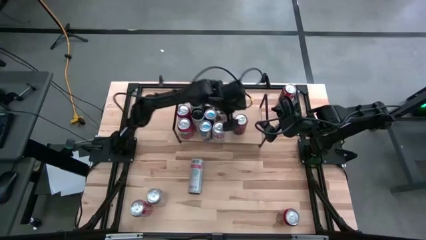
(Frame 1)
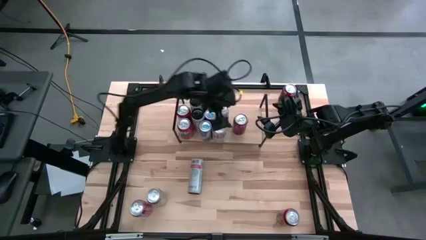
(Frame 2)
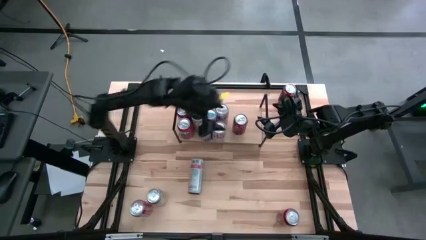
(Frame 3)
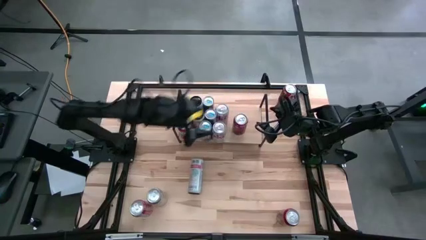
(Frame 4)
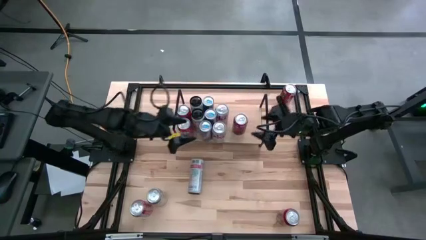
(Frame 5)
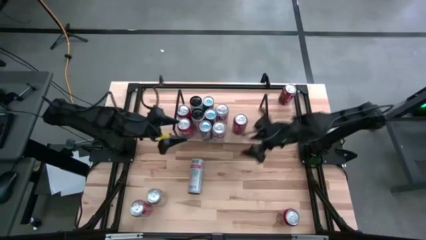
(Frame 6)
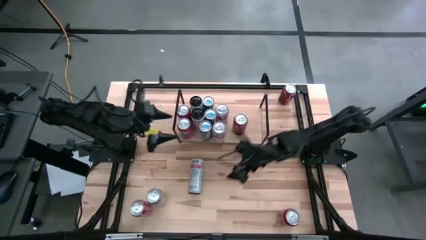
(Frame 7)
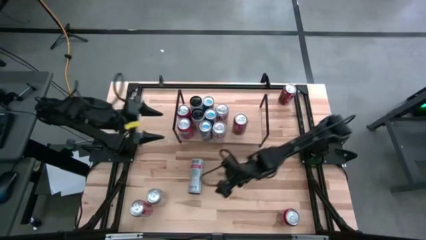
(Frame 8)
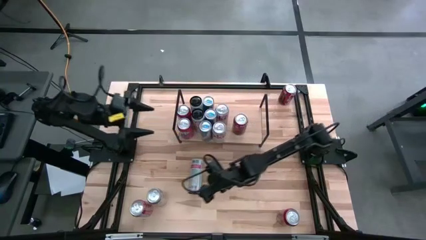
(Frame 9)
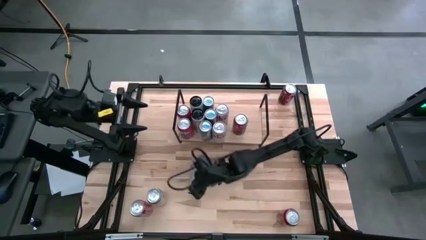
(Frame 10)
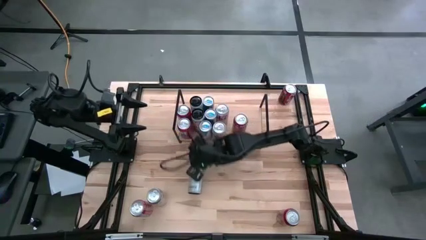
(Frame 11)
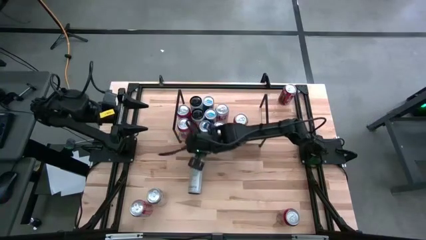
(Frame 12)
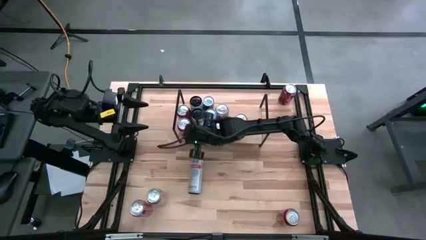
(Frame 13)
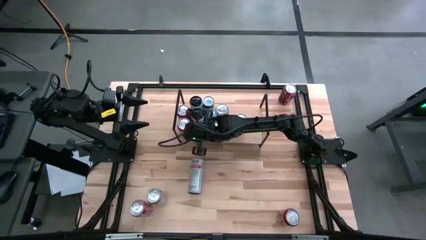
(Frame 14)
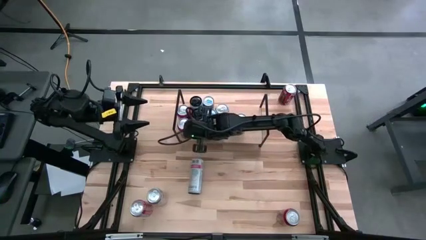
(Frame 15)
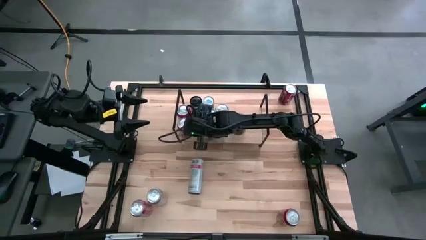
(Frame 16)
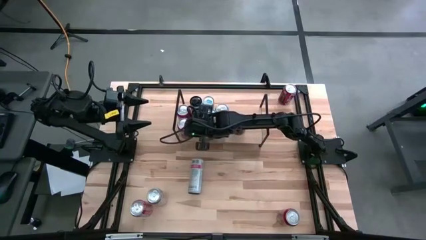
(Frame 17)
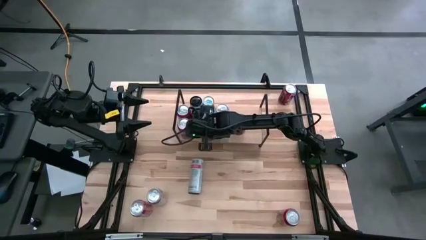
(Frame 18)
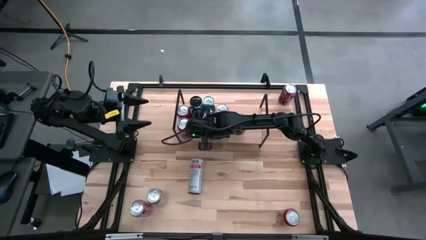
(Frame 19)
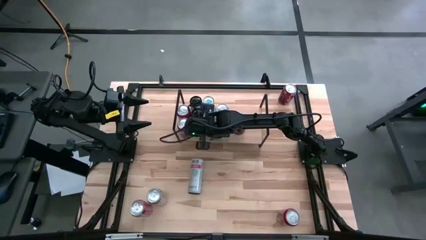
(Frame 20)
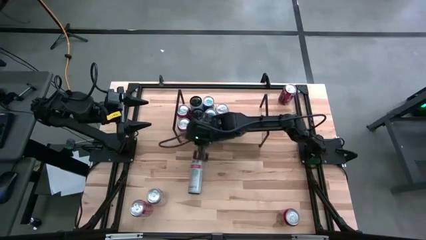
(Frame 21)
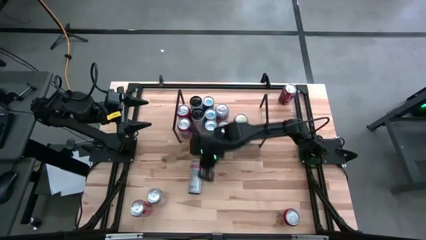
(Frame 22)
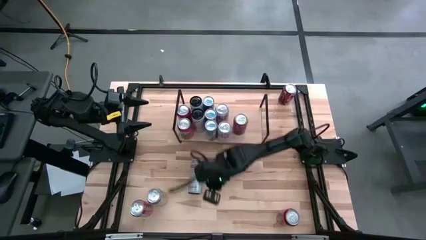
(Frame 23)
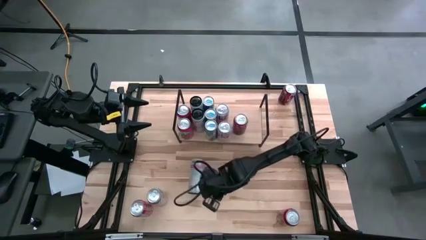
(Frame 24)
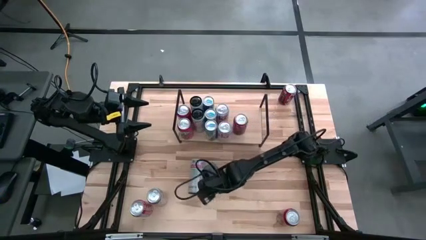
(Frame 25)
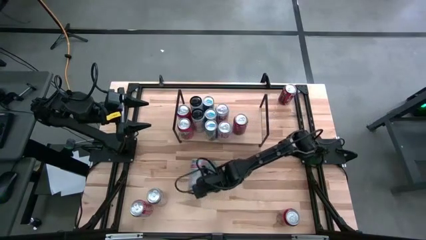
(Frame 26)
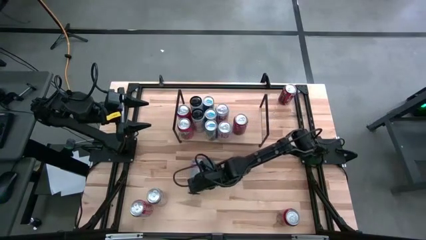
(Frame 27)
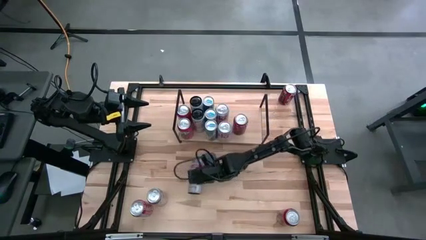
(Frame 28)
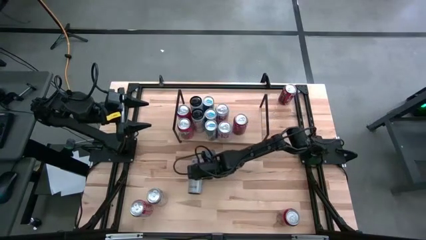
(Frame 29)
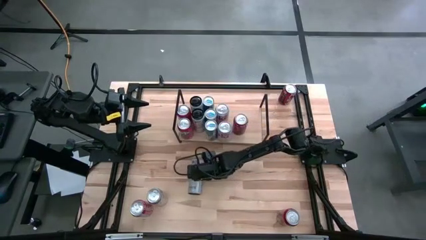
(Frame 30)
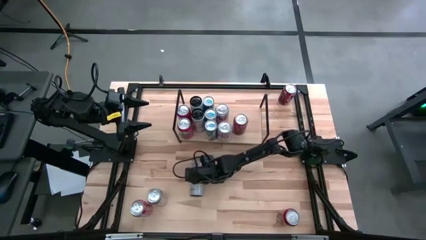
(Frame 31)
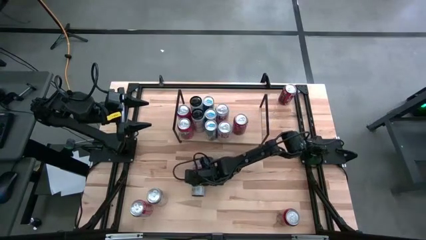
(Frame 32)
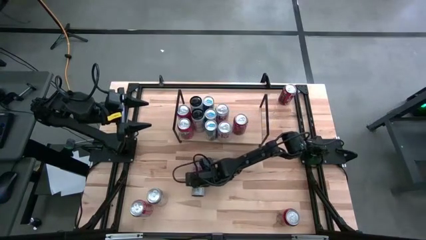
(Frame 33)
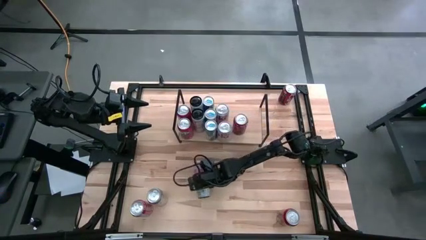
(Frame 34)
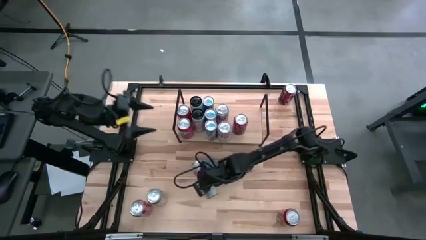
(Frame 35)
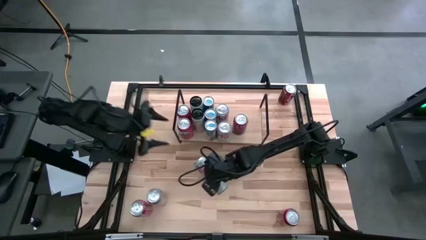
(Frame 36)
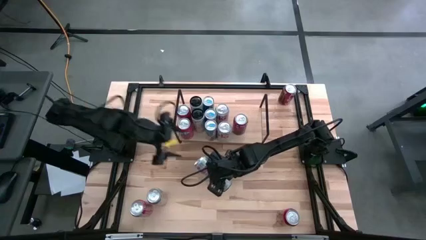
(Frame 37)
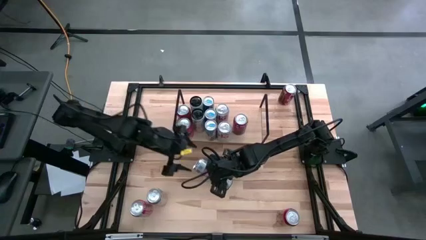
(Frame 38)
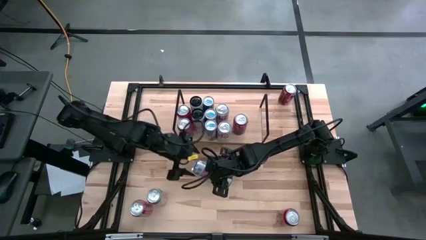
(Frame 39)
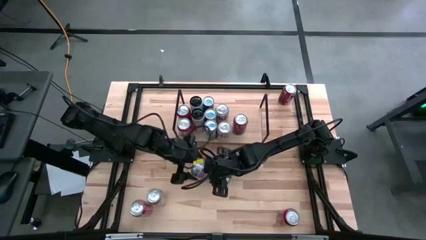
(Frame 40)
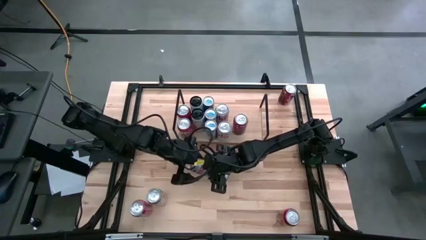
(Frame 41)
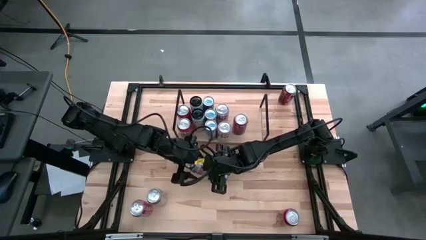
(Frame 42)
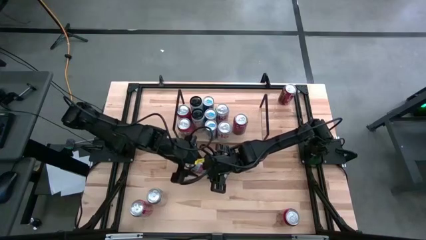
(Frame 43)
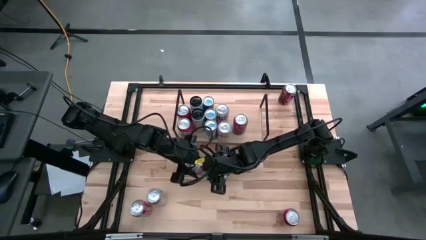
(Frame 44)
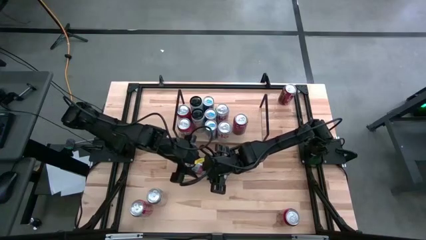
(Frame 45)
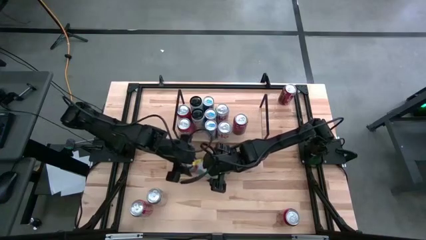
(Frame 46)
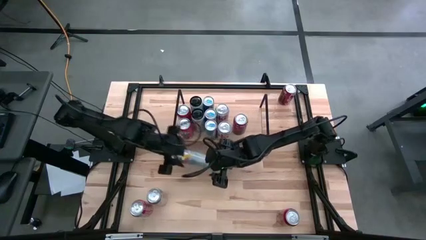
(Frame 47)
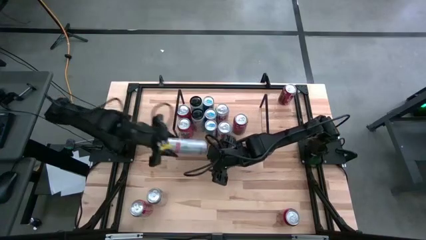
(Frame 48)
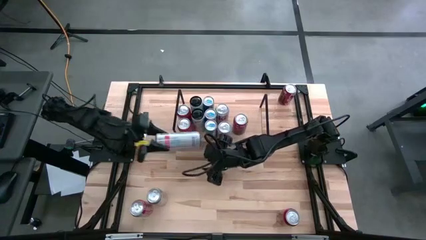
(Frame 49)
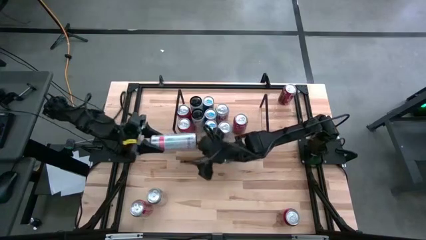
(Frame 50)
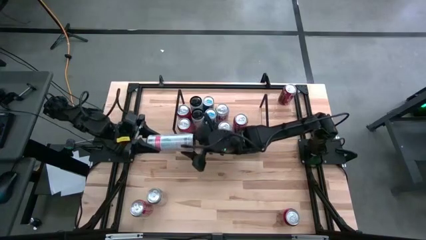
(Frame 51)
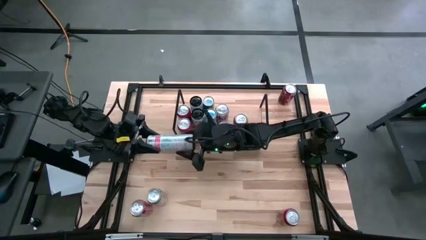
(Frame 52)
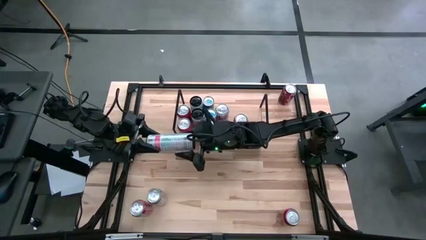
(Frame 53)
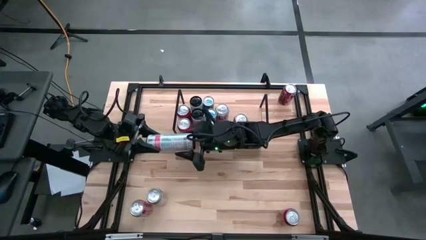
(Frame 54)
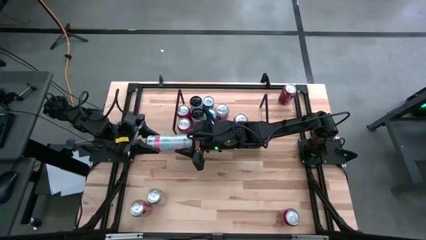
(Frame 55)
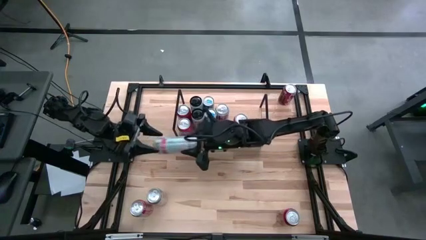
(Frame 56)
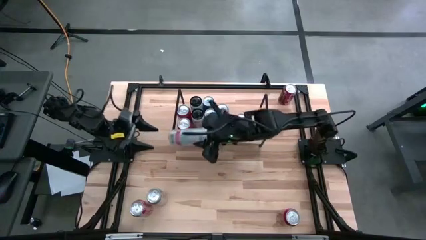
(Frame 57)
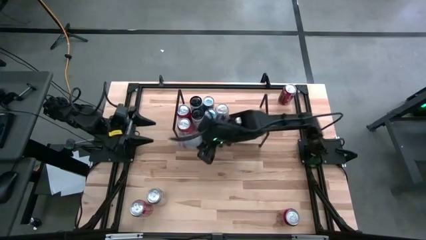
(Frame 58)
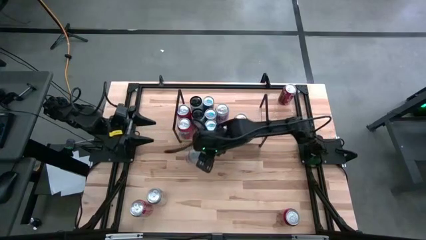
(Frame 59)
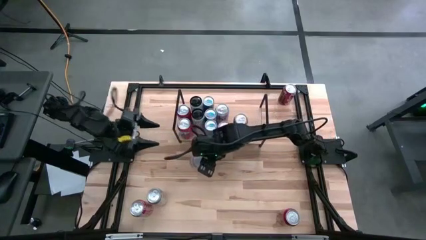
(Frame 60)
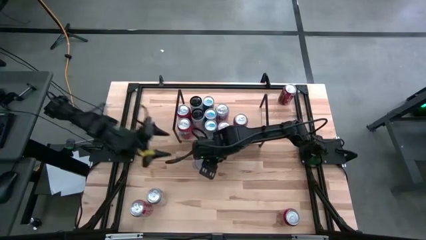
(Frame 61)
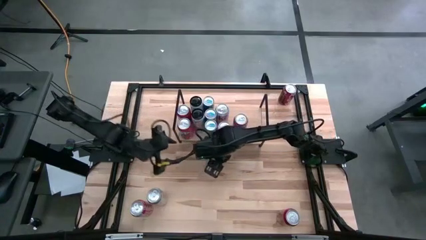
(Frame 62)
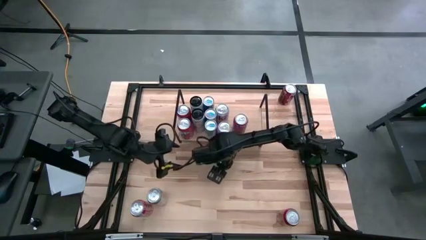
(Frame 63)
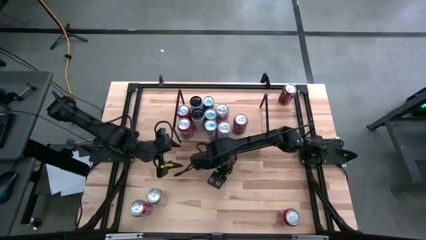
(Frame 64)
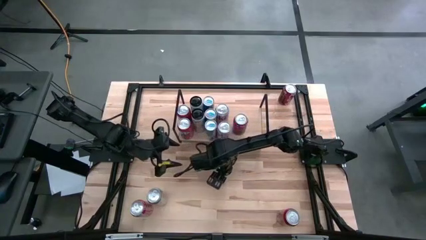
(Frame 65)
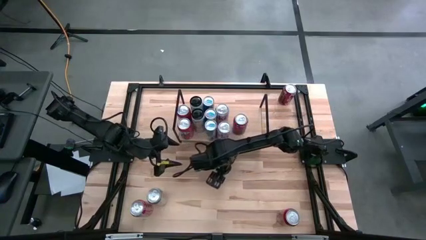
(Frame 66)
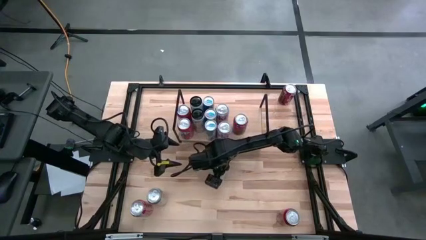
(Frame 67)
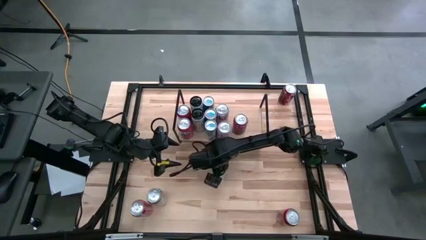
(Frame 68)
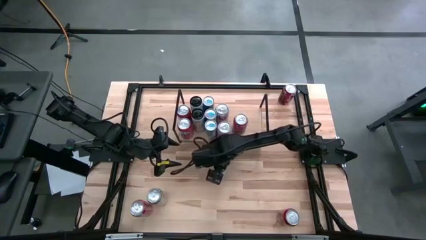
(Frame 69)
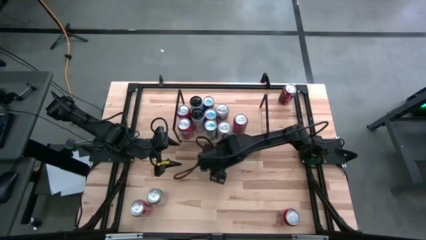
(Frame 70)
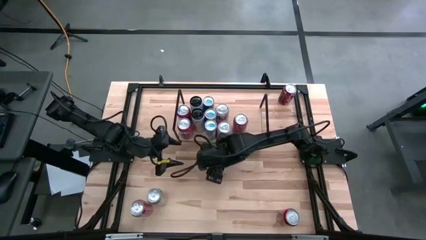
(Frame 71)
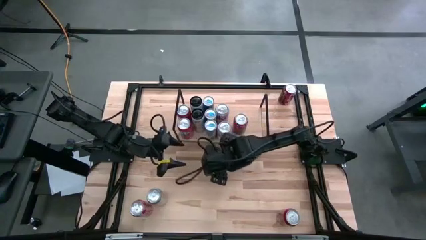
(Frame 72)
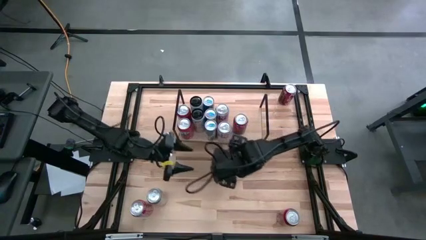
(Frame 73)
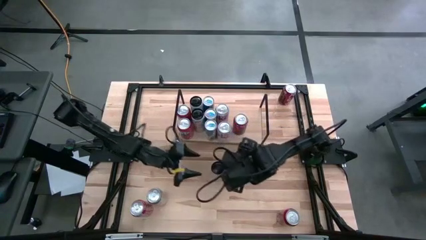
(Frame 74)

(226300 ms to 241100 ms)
Task: Place canned beverage on shelf
Put the white-pink soda can on the shelf aligned with the other white-pink soda cans

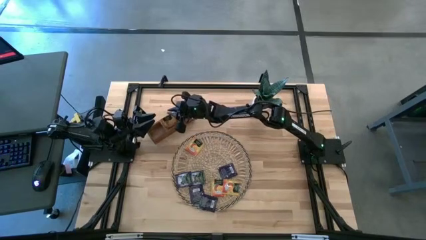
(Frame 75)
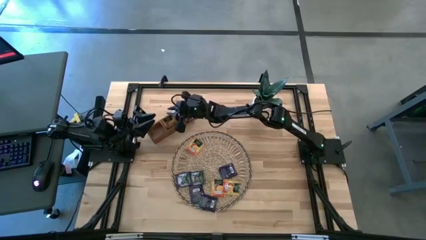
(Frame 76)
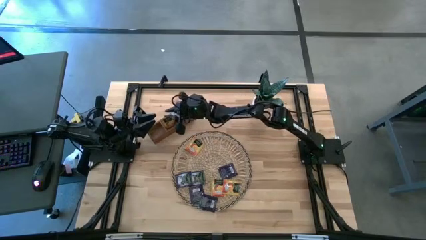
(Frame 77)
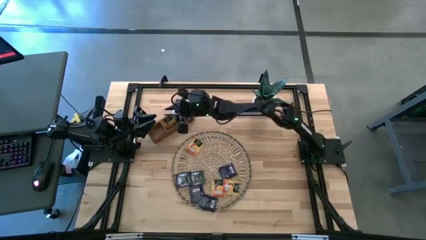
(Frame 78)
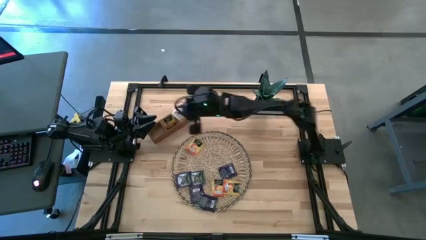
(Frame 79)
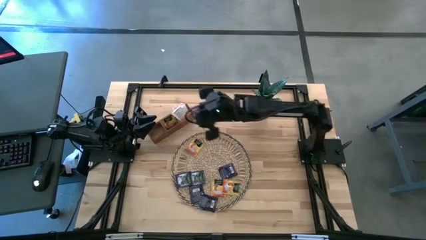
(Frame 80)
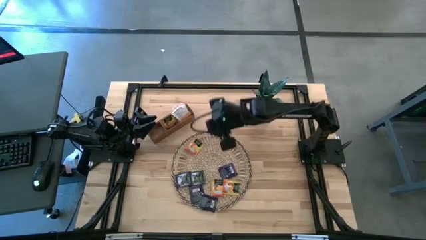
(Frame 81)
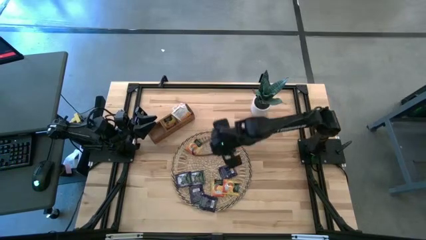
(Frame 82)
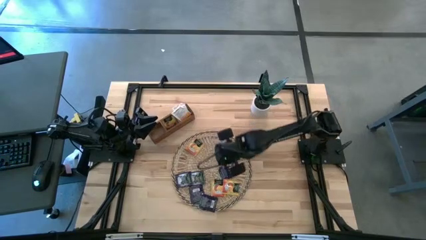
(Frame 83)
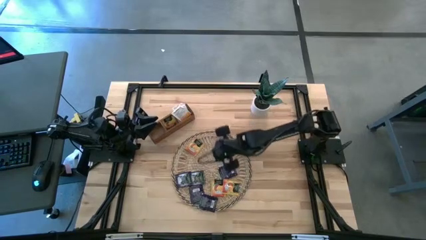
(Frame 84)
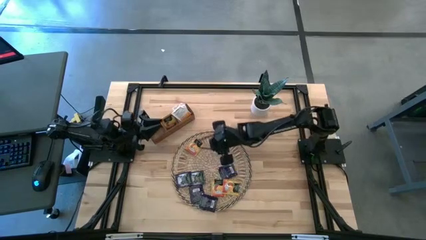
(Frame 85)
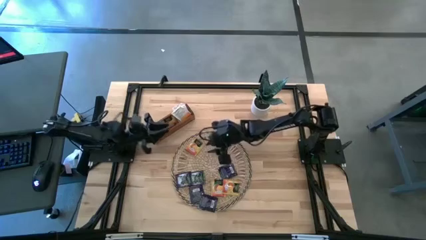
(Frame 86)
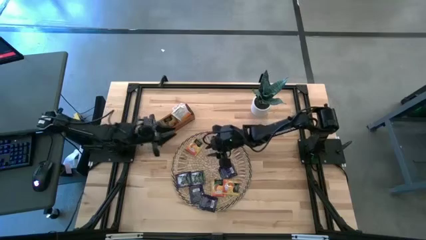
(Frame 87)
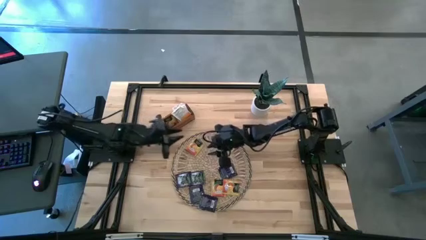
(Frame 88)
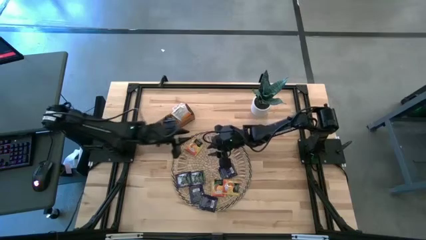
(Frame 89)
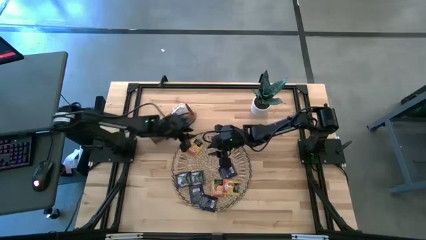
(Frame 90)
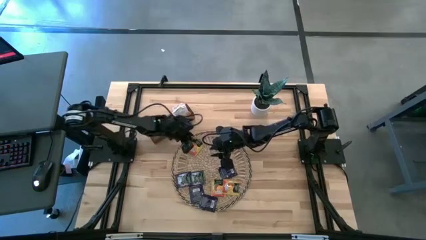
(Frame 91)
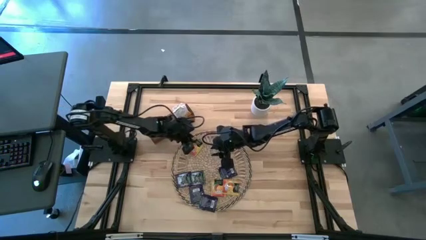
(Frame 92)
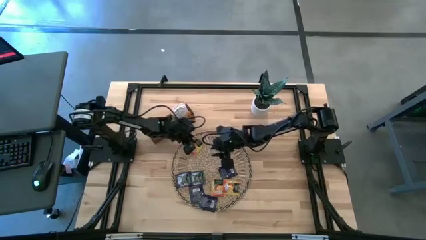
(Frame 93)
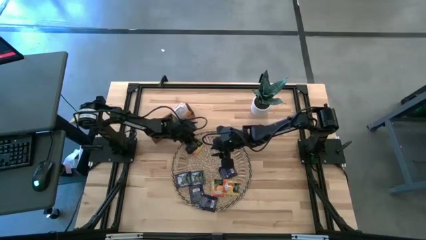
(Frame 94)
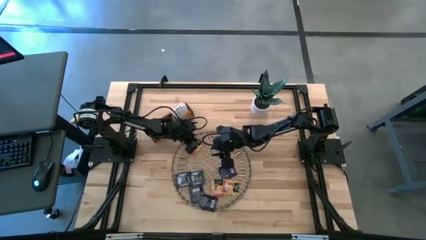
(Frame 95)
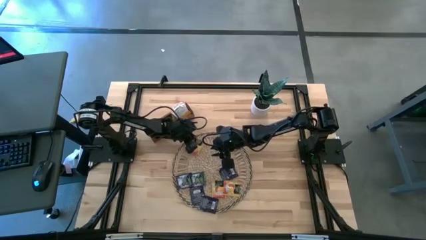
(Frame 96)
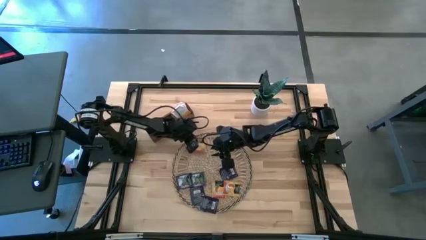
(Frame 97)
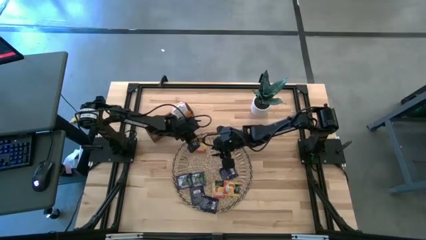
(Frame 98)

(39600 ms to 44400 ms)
Task: Pick & Place Tea
Put the top left orange tea bag into the middle compartment of the wooden organizer
